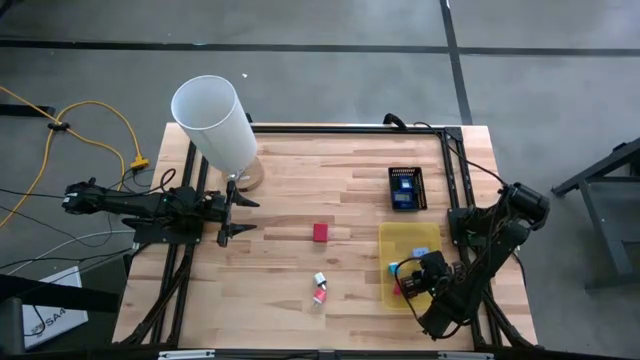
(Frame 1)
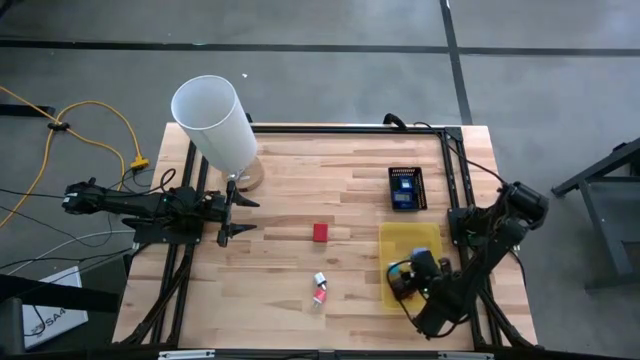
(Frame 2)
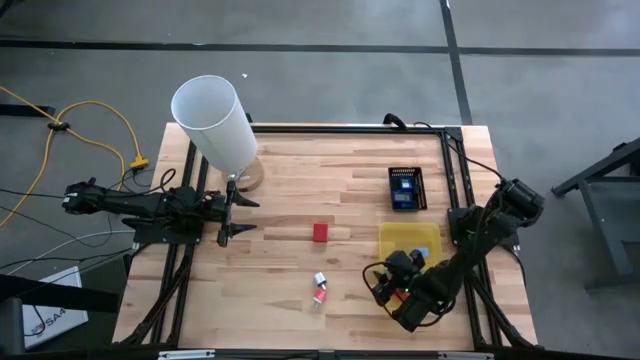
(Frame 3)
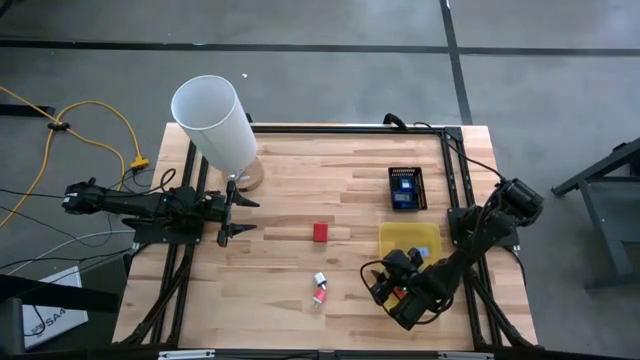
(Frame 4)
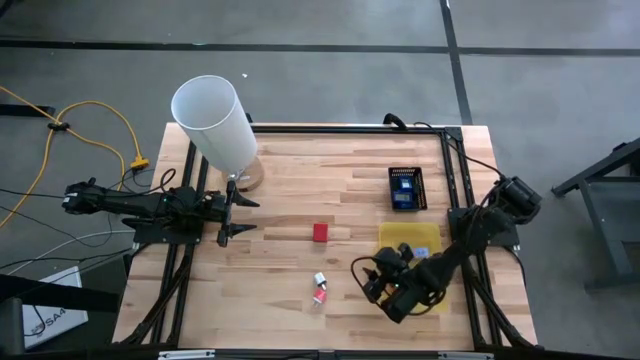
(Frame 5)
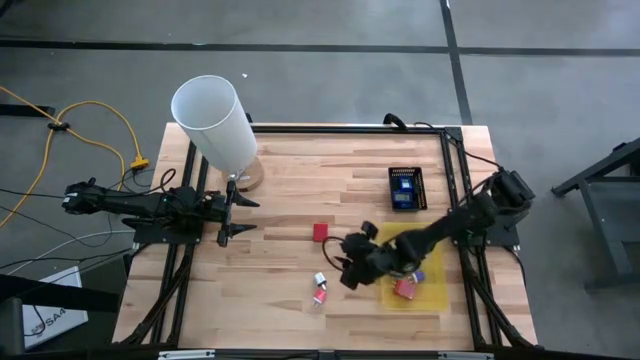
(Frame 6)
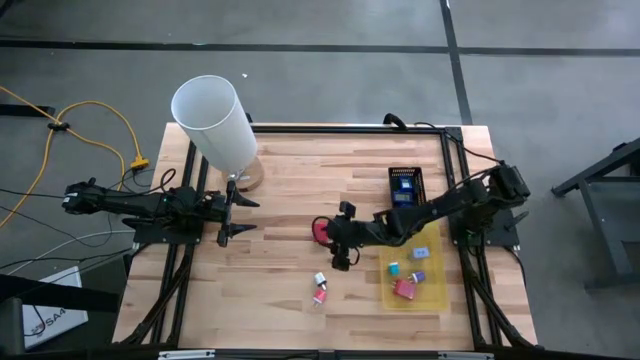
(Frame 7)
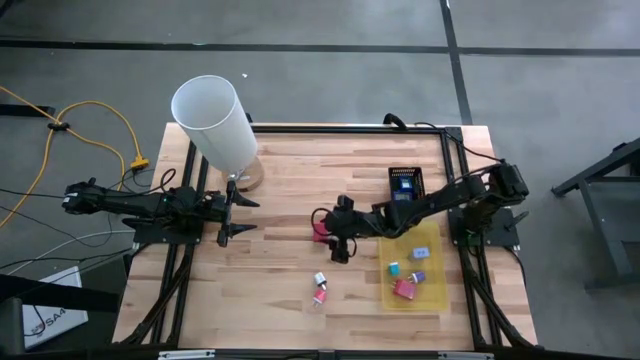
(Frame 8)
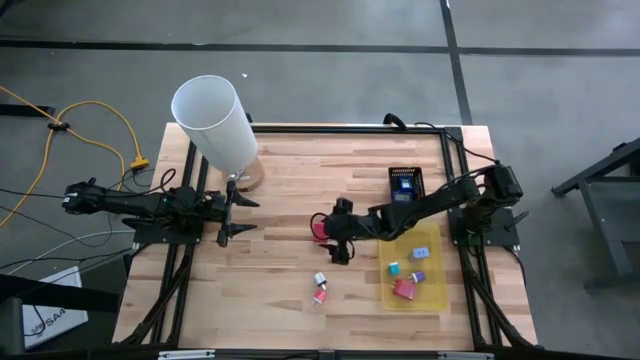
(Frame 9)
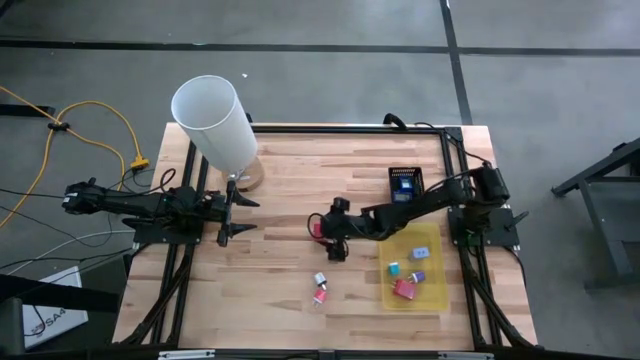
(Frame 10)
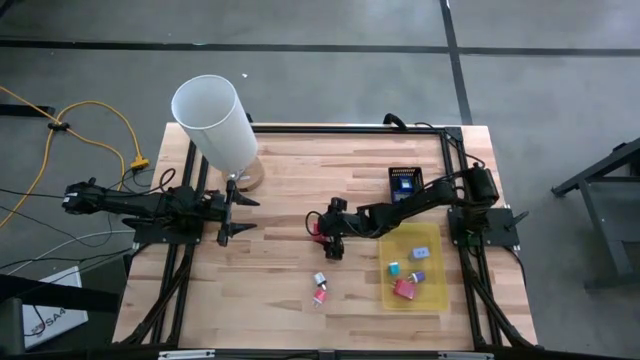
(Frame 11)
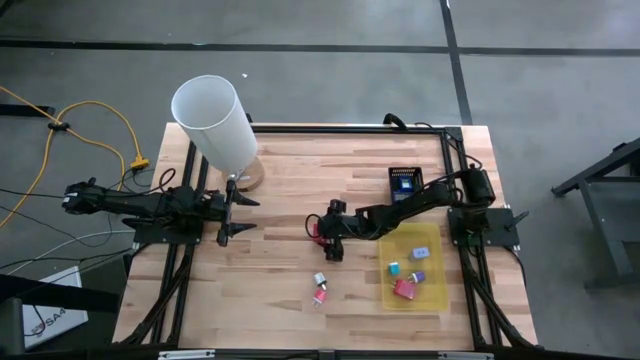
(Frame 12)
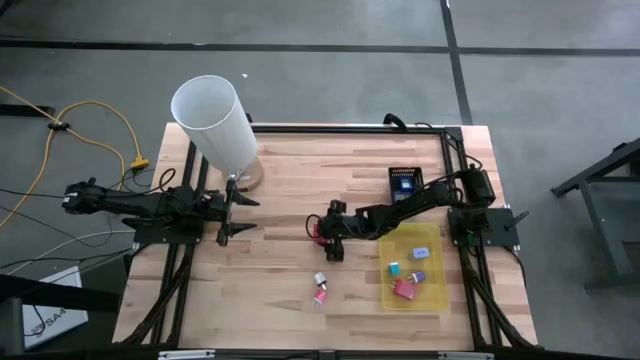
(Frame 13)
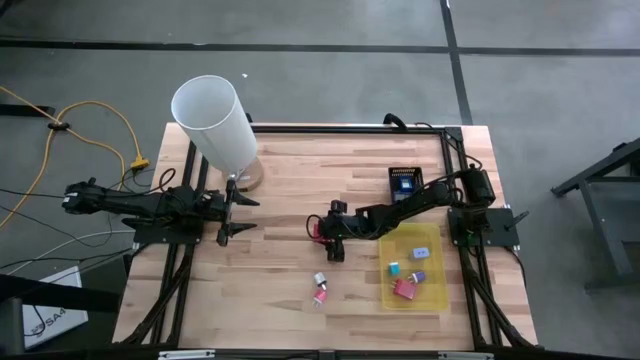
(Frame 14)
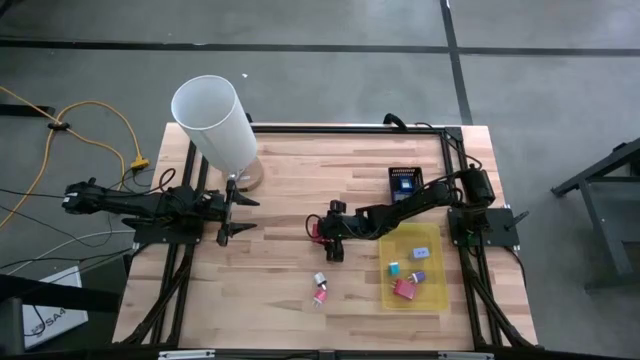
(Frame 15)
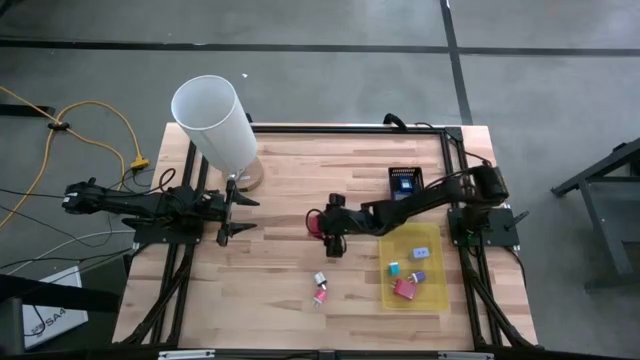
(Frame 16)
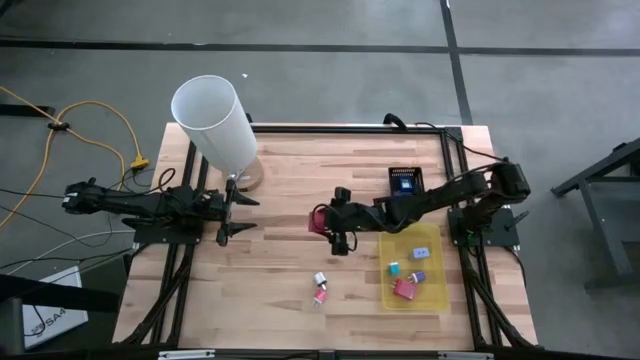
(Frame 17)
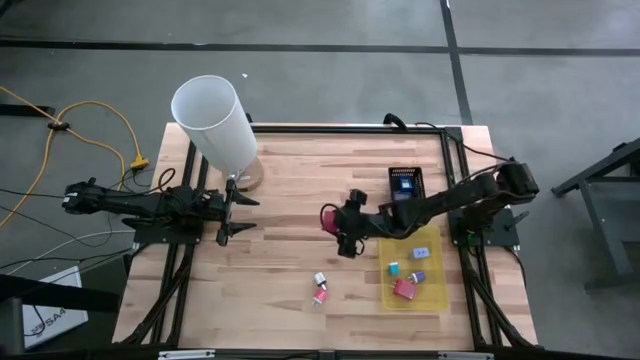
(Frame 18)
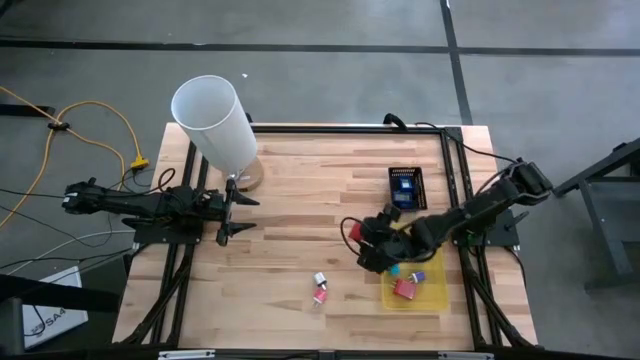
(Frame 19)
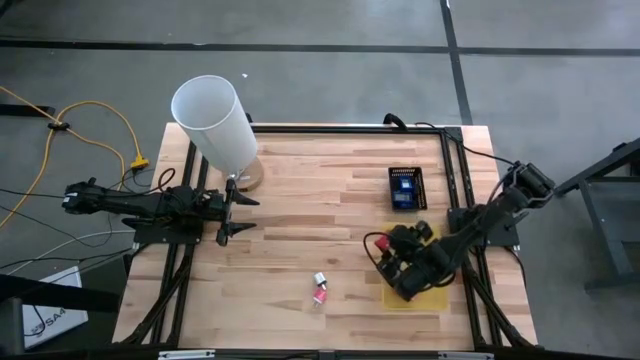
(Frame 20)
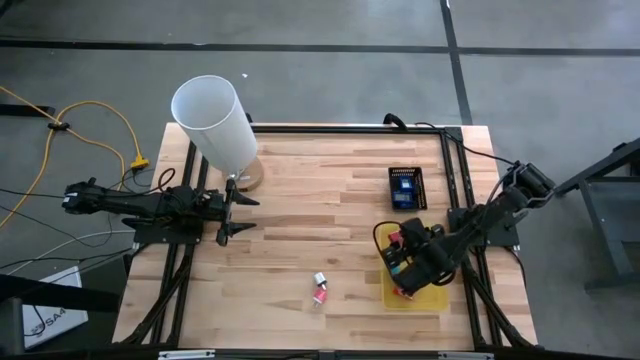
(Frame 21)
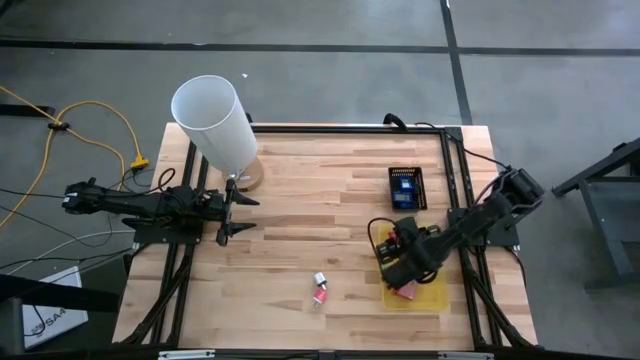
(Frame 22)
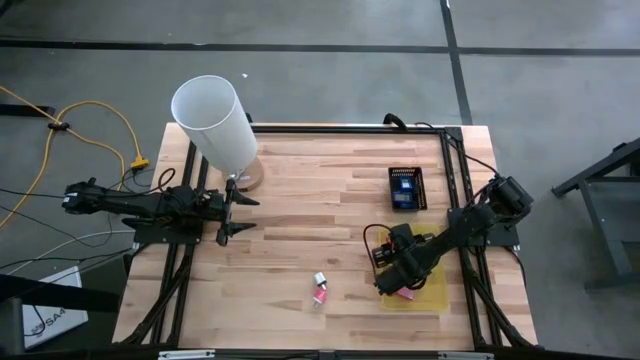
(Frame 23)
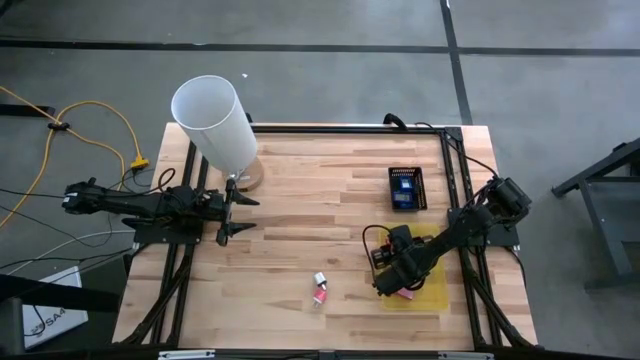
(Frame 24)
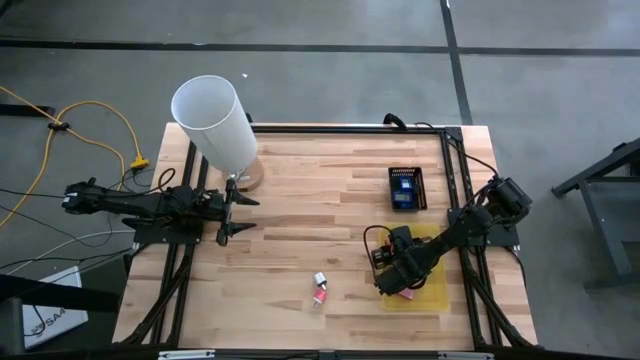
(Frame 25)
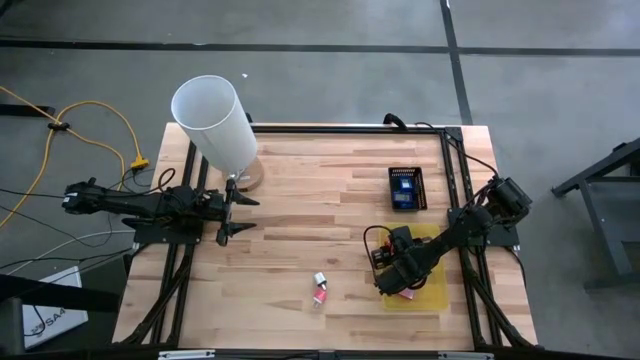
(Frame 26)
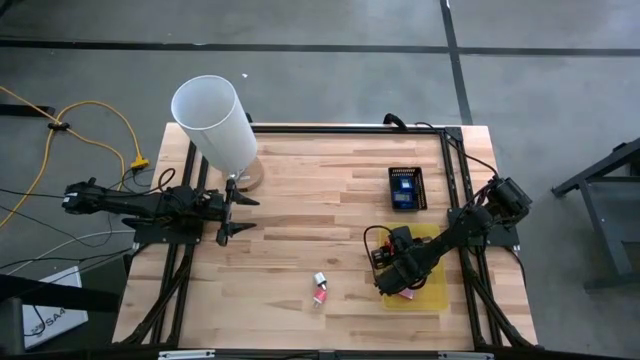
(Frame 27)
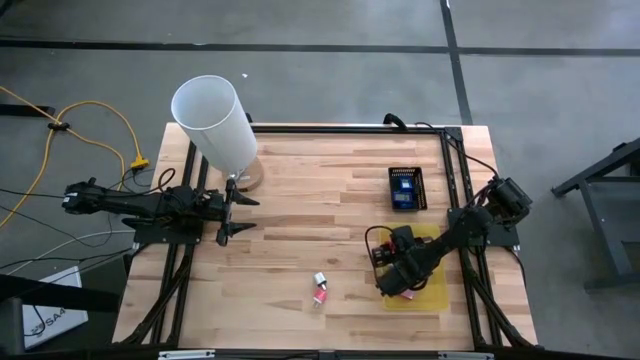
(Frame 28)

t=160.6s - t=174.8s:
Task: Pick & Place Office items
Put the red charger adapter into the yellow bin

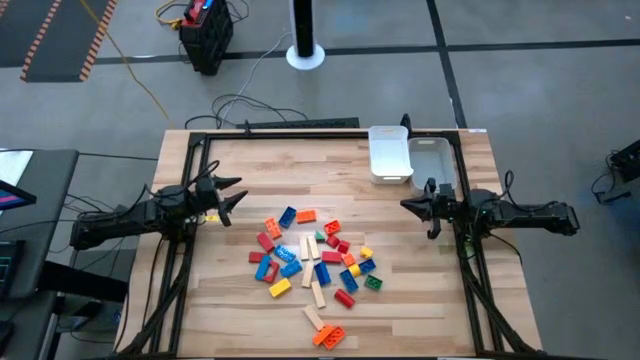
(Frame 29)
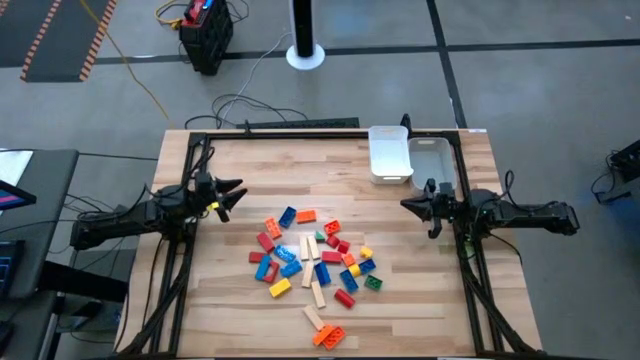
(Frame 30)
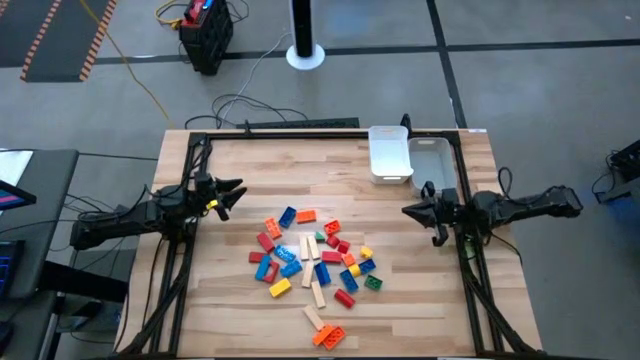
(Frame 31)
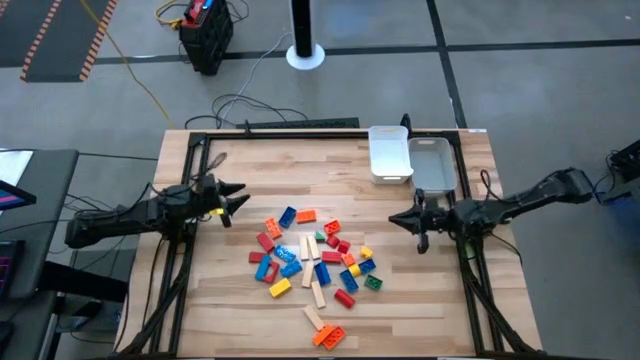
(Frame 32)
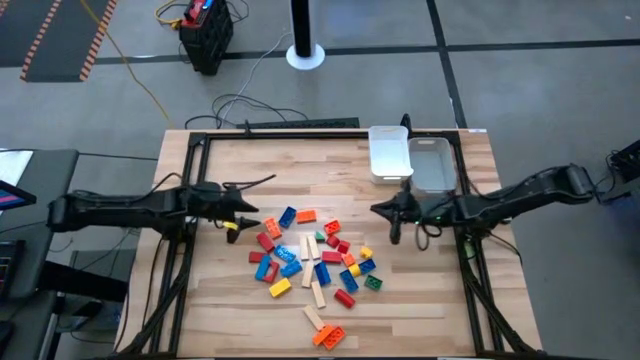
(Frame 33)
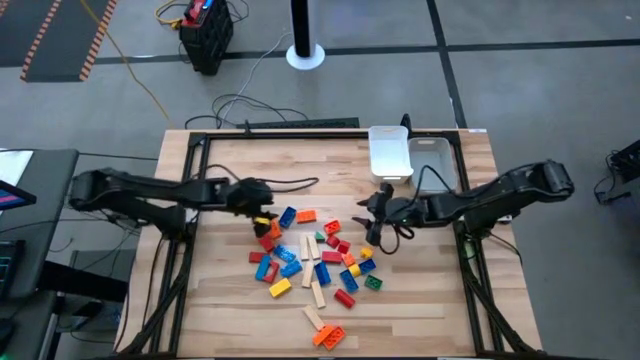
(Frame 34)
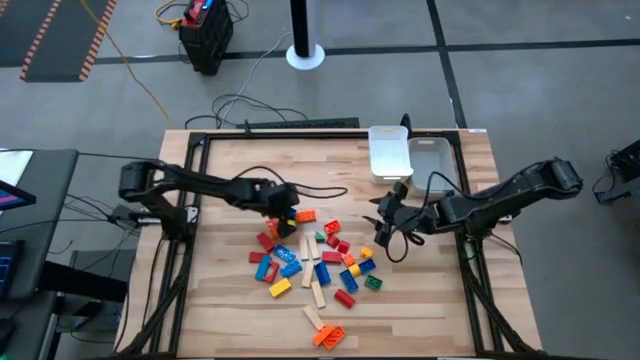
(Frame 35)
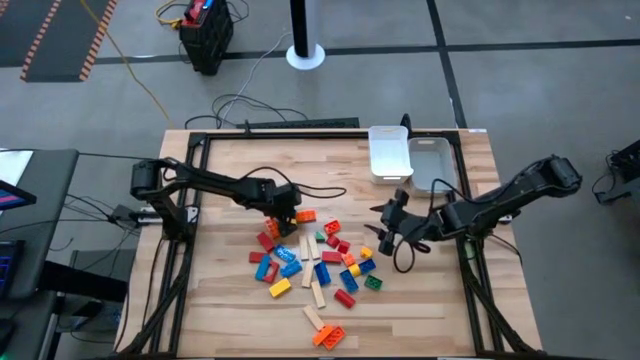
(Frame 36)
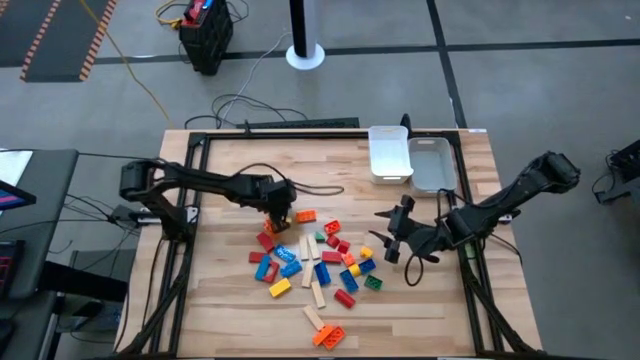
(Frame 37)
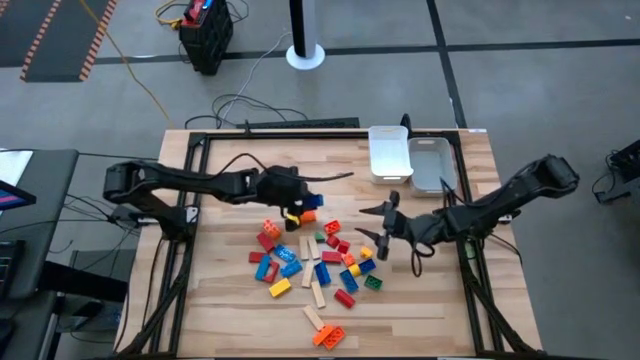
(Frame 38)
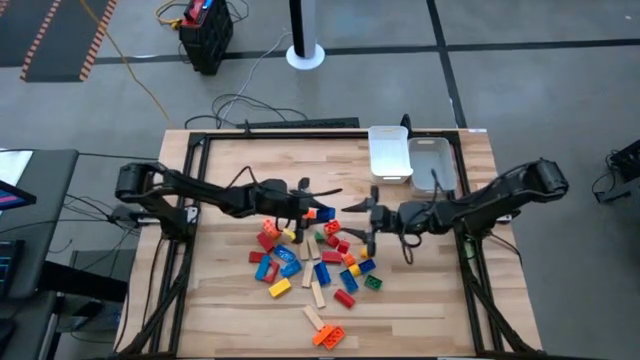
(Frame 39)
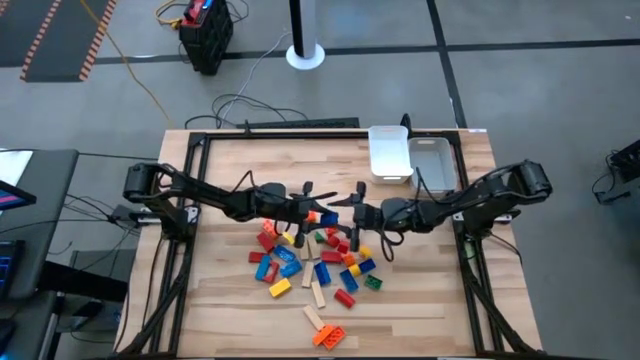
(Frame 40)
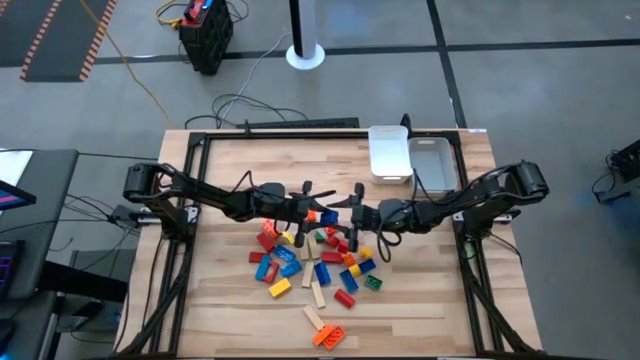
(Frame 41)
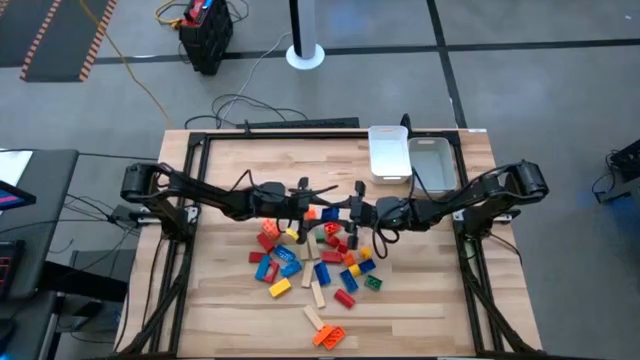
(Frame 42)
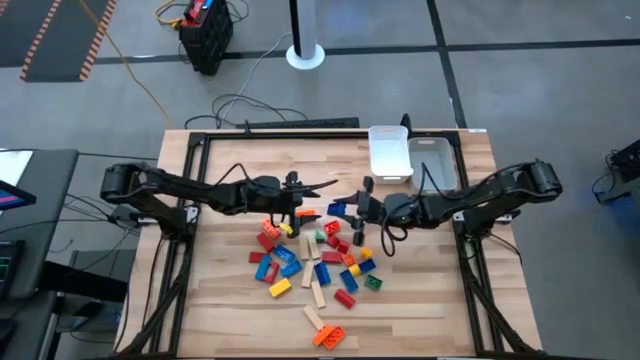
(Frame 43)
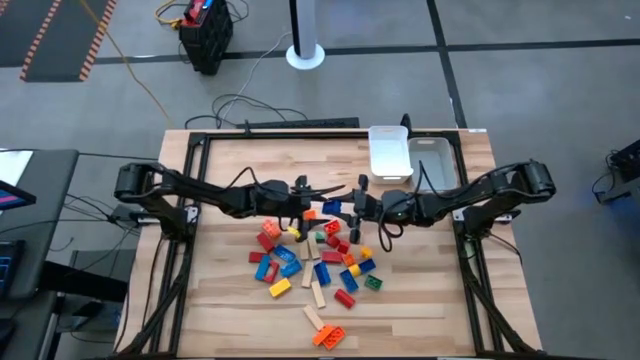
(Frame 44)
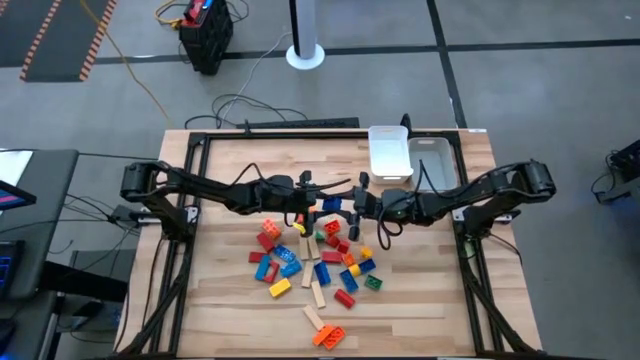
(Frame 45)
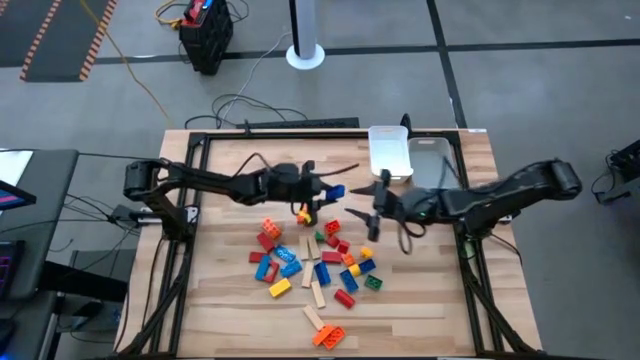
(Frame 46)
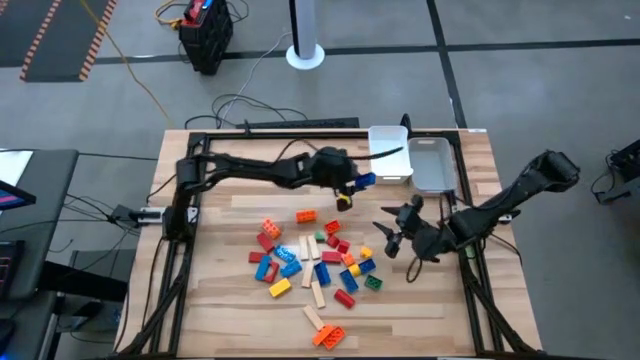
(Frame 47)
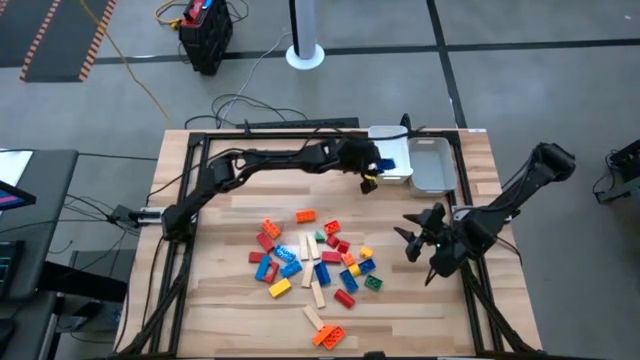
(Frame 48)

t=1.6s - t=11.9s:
Task: Sort blocks by size
Put the large blue game piece into the white bin
